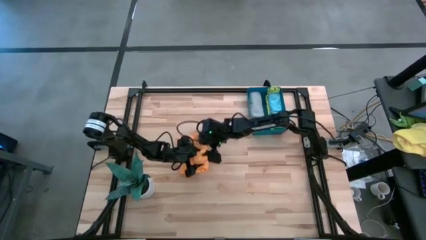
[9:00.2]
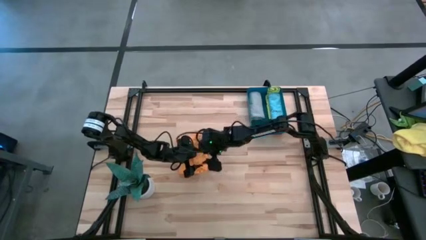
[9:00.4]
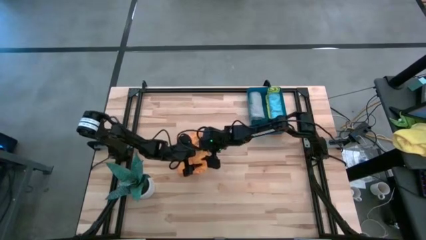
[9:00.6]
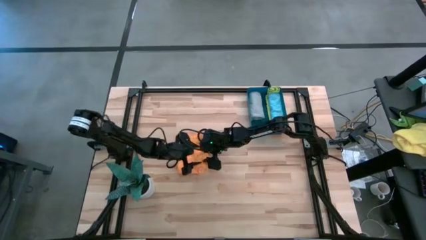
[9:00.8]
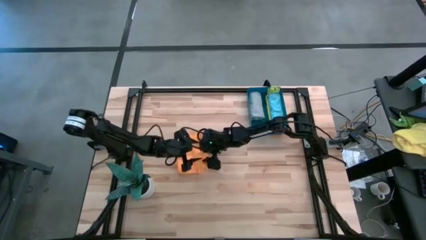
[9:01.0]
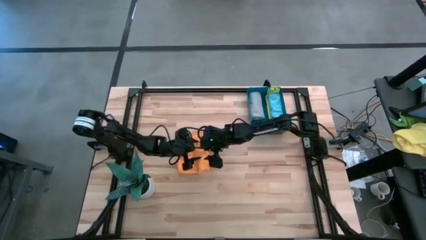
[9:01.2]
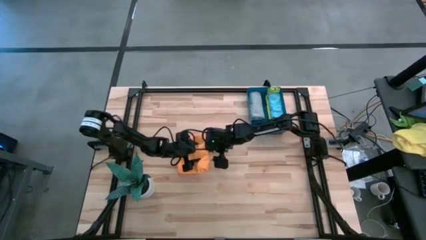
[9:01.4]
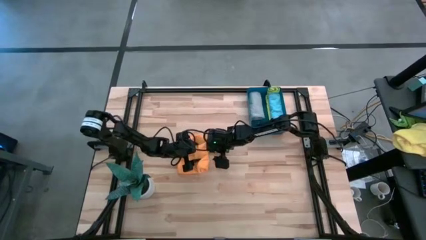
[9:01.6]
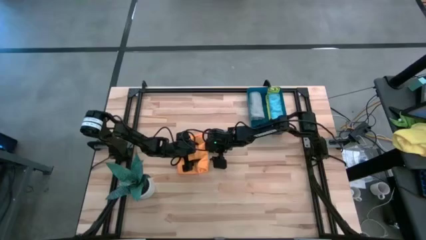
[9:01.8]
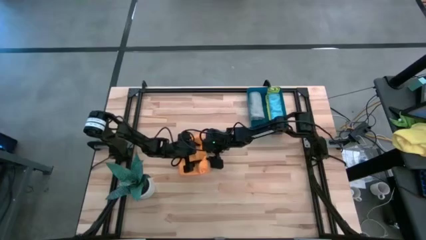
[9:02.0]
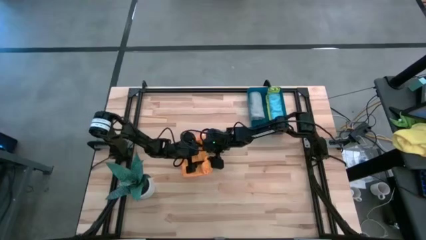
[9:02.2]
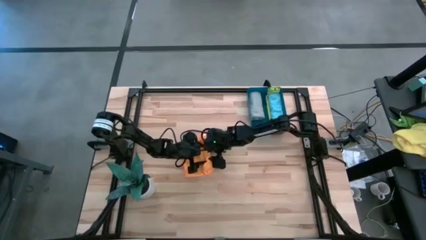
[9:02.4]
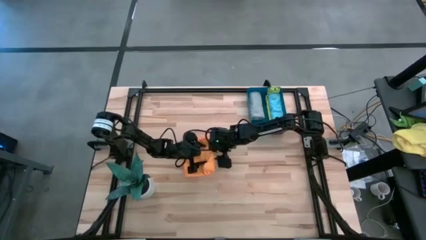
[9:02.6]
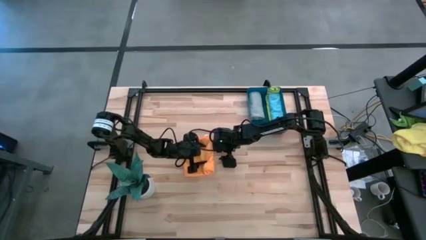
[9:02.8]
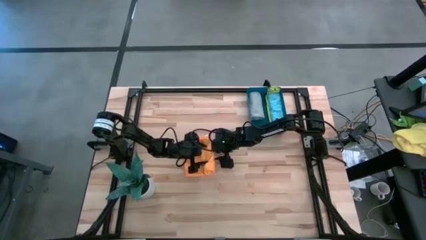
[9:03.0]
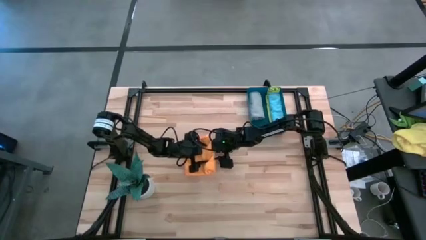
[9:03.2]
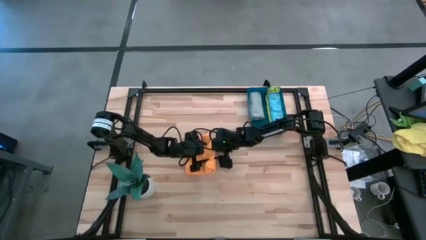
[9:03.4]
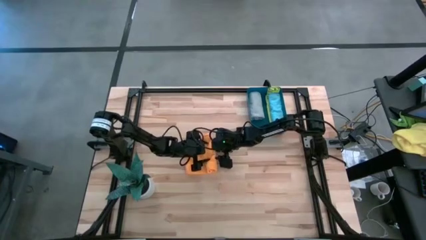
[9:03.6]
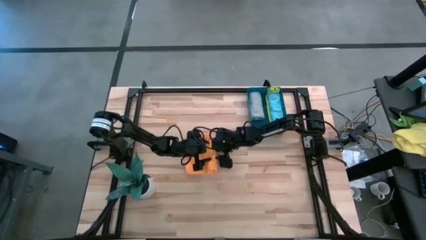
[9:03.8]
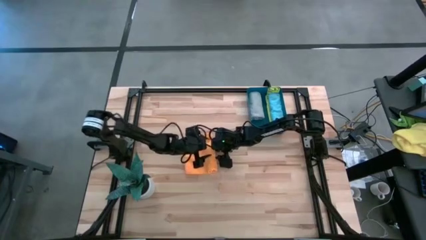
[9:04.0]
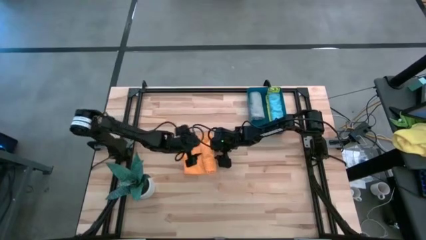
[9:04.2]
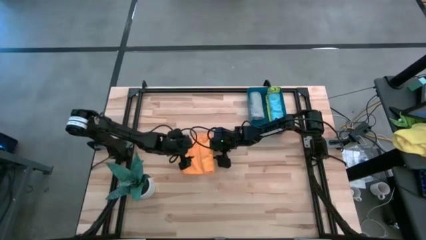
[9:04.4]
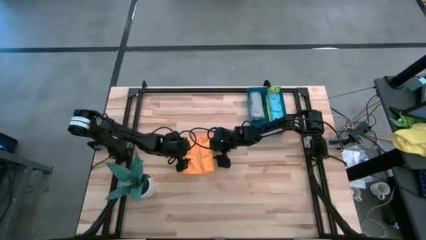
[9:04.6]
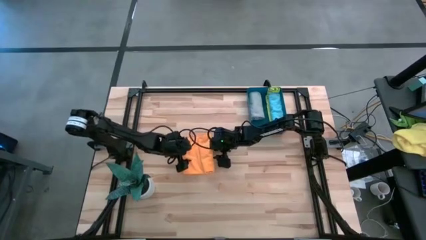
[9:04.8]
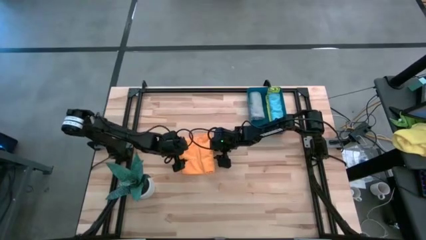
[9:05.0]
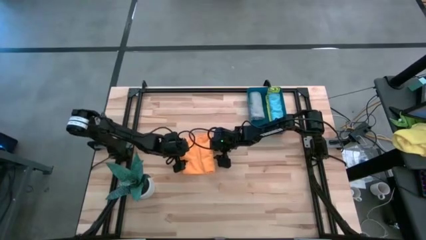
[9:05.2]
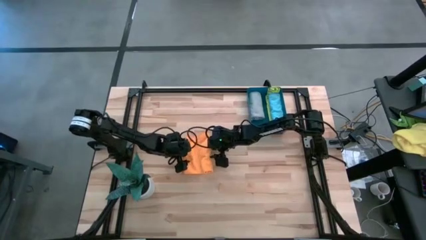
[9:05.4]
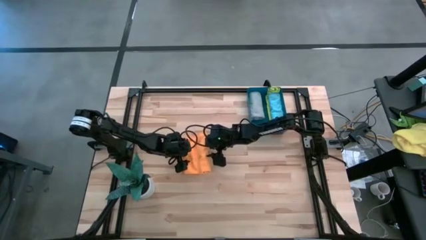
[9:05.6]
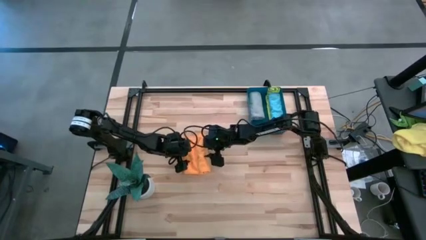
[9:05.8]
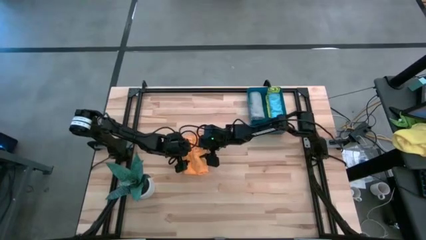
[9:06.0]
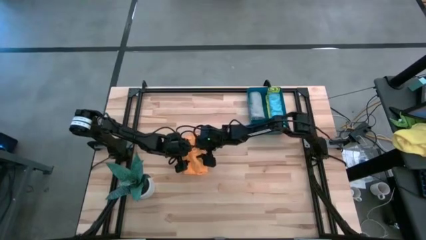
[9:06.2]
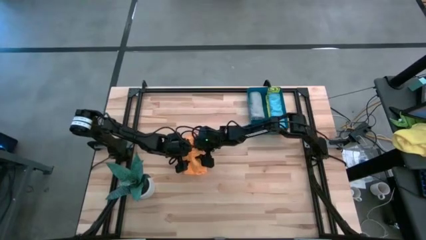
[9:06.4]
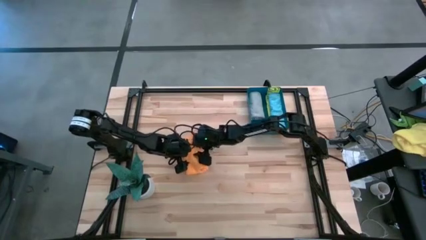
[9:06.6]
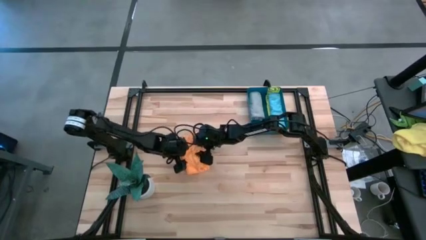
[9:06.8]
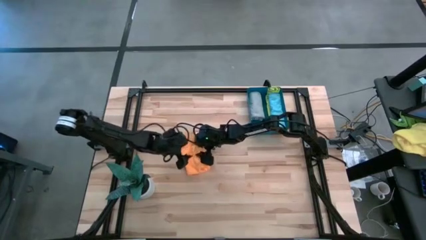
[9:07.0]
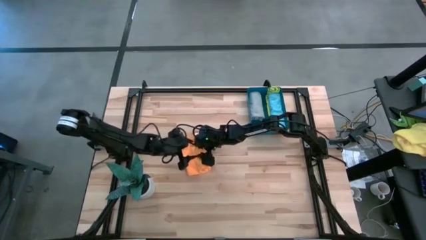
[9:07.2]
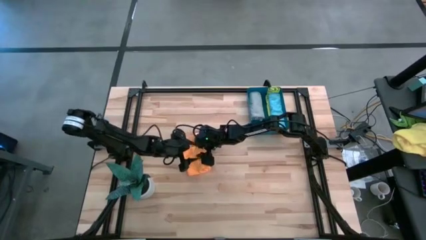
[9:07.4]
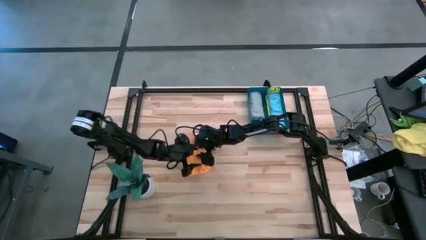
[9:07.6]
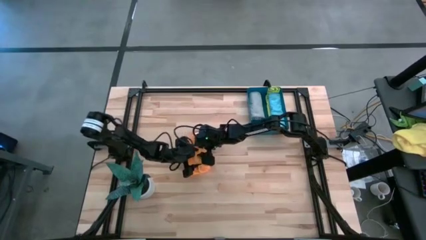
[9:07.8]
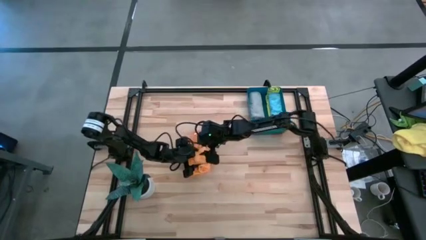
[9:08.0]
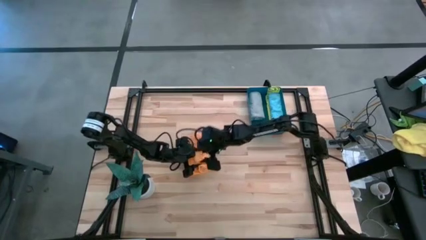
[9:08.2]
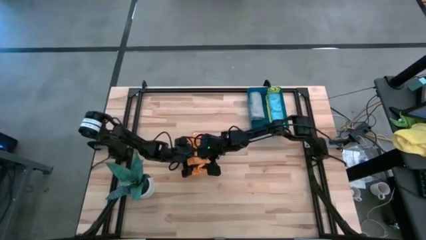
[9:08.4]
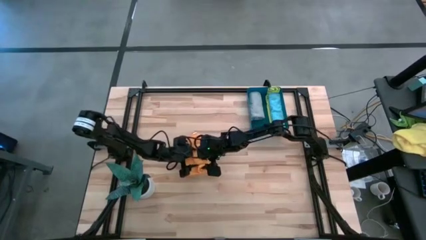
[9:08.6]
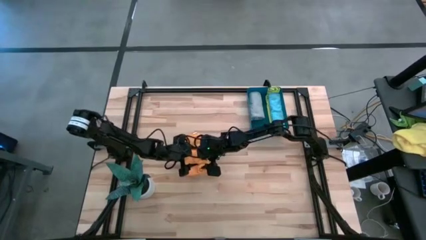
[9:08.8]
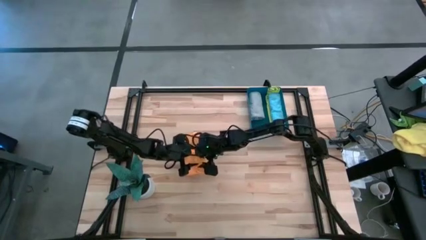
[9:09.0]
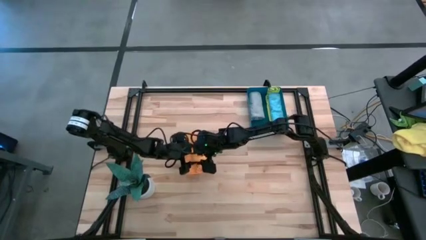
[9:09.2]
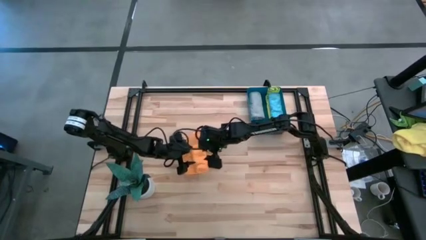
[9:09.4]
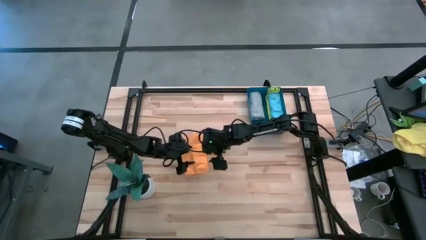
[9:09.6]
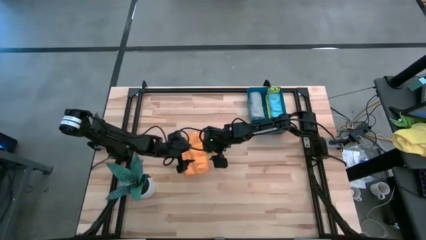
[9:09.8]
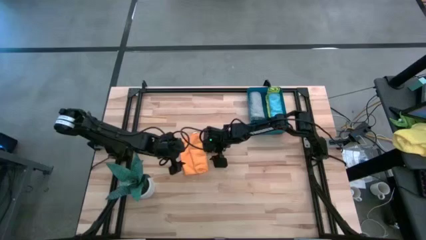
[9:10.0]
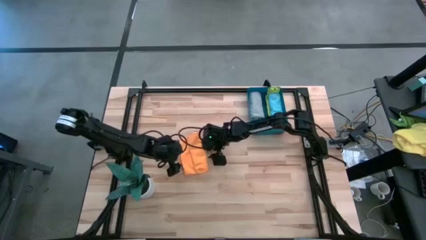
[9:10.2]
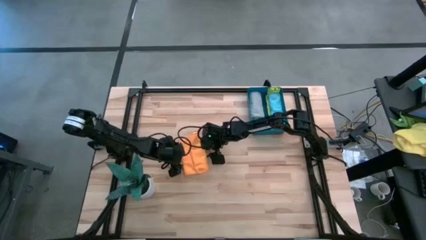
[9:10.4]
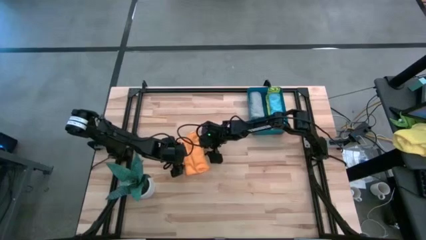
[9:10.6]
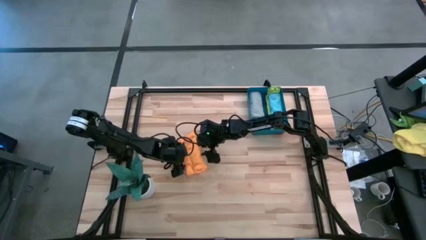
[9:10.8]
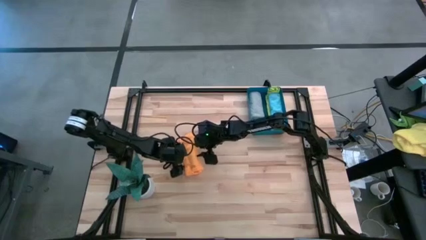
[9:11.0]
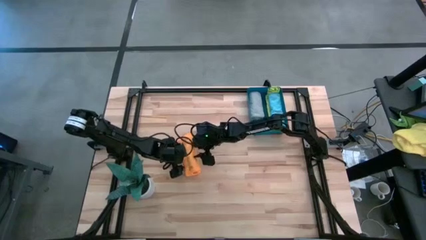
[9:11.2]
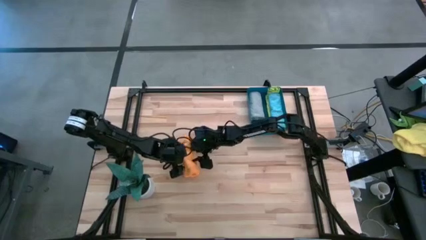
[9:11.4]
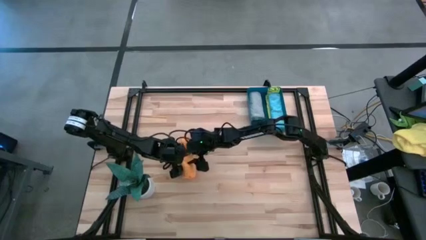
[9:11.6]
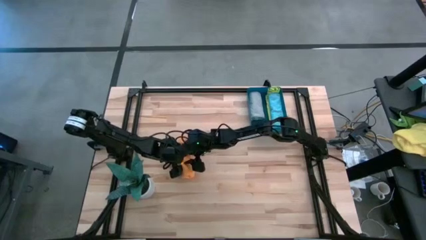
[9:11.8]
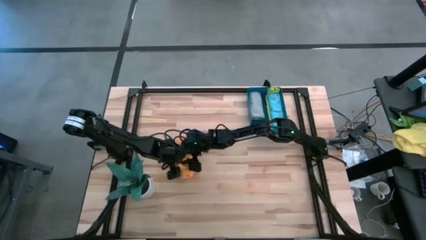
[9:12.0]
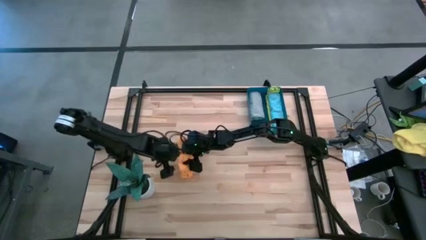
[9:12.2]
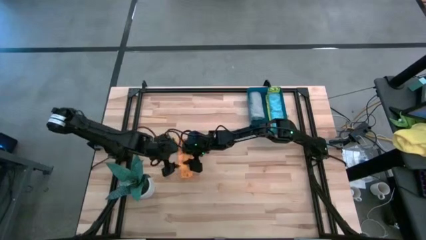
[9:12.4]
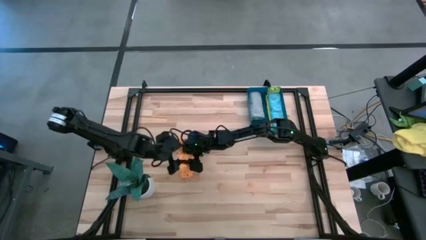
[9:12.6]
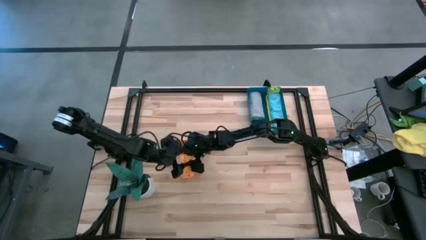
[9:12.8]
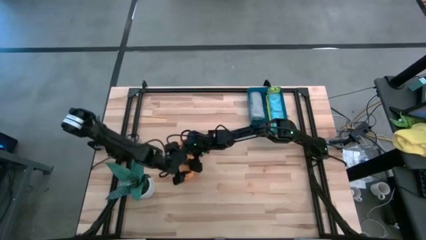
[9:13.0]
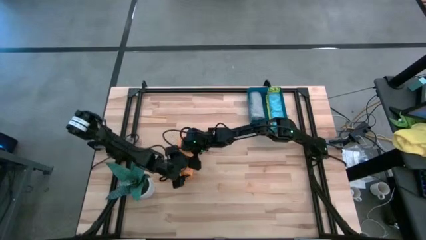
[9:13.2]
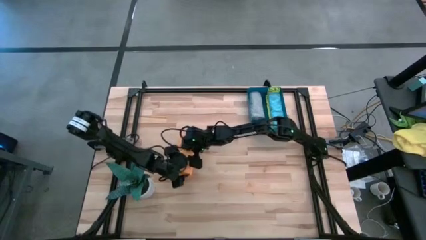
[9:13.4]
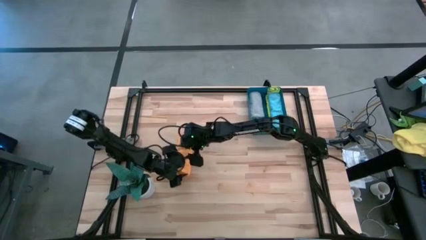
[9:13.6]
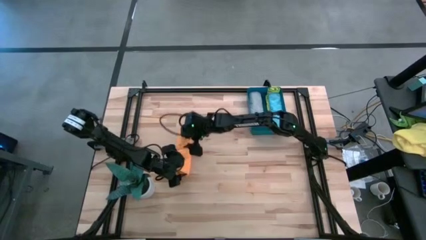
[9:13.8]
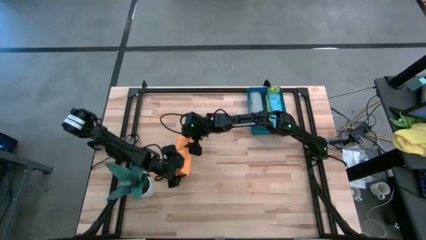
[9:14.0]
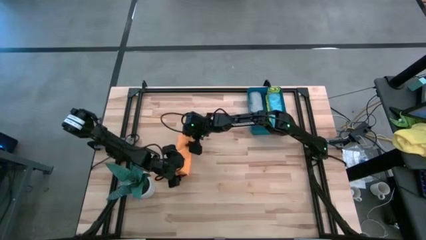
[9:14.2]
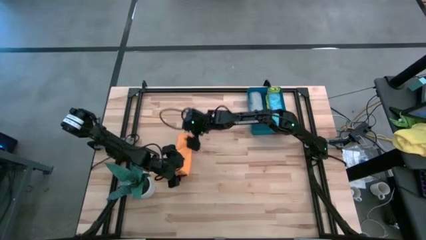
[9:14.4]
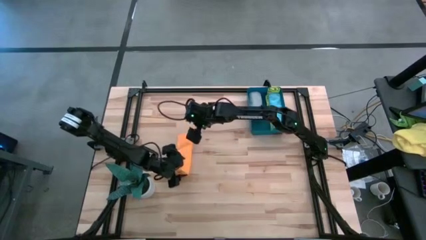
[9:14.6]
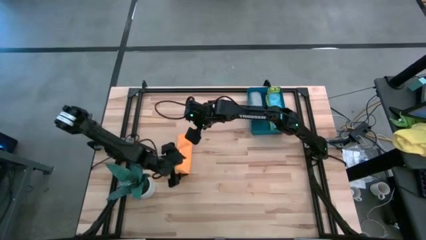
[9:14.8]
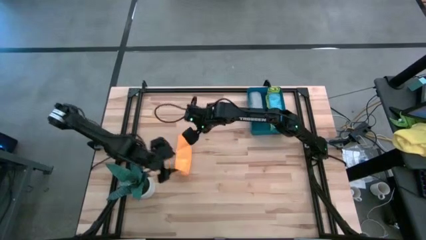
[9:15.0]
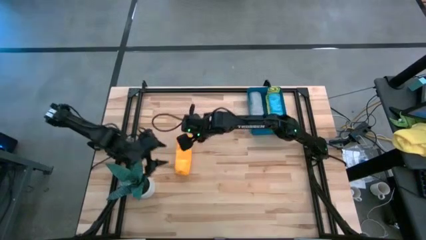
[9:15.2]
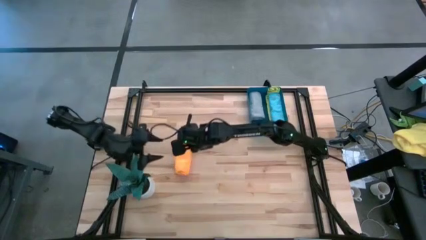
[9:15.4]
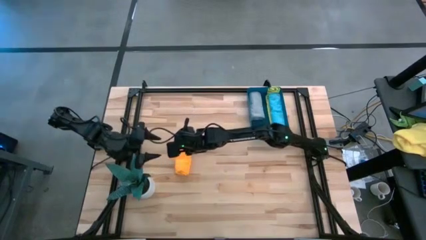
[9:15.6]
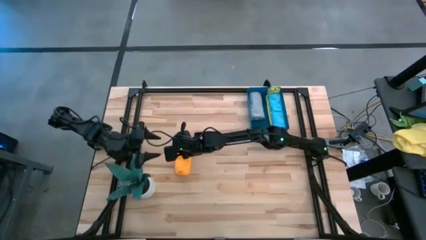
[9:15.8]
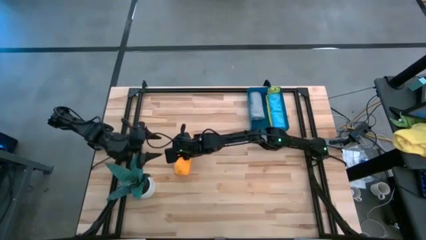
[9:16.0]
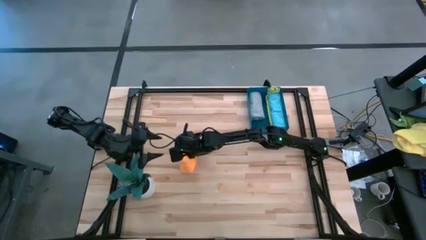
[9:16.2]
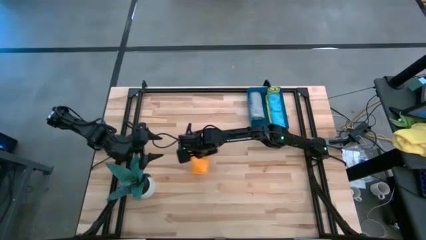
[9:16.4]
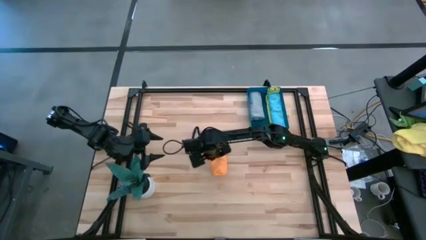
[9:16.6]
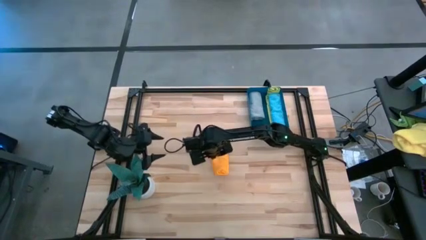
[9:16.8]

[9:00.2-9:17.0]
Task: Roll microfiber towels into tight, uniform cylinder then place into a basket
Roll the orange towel
